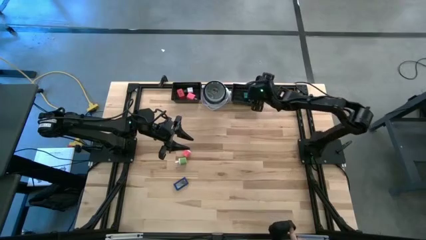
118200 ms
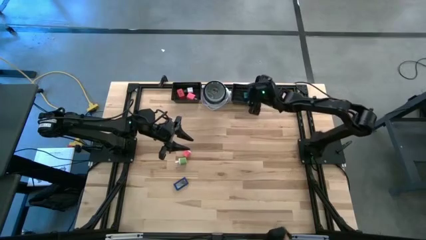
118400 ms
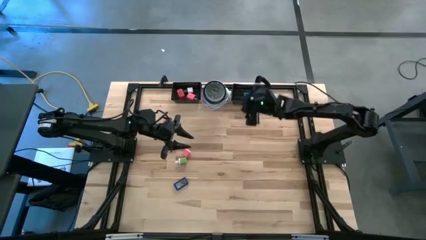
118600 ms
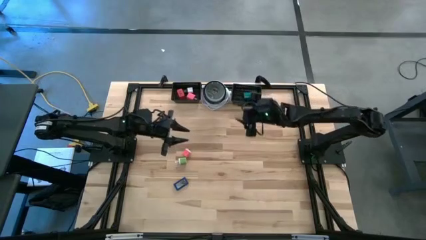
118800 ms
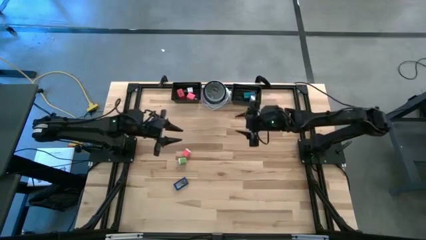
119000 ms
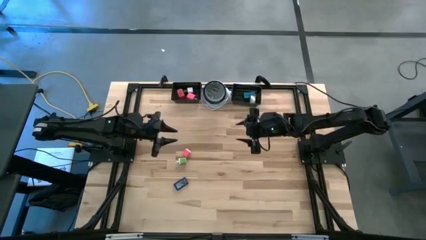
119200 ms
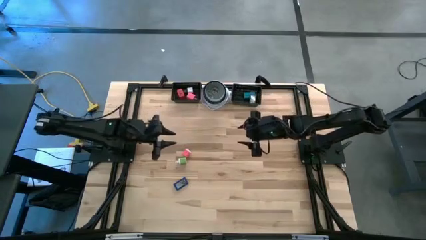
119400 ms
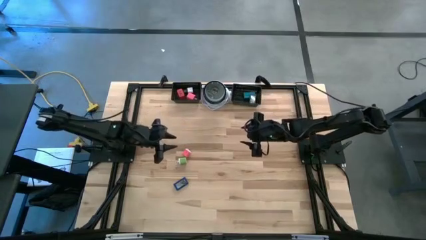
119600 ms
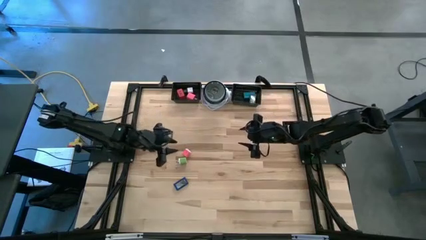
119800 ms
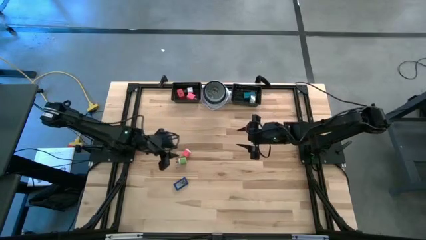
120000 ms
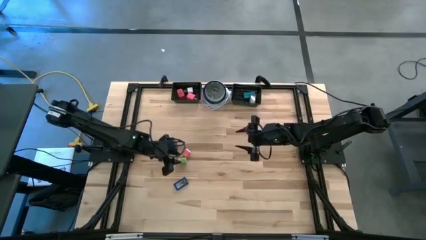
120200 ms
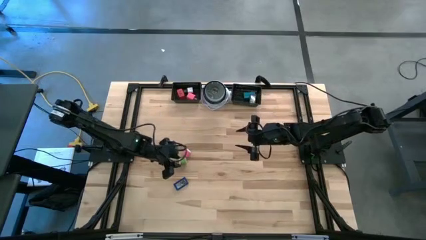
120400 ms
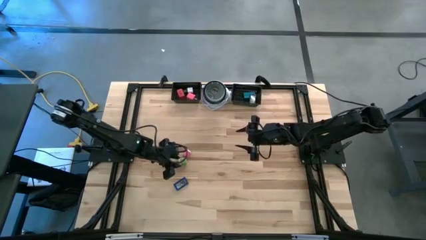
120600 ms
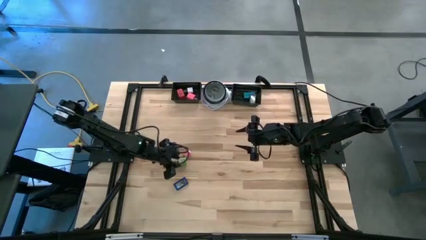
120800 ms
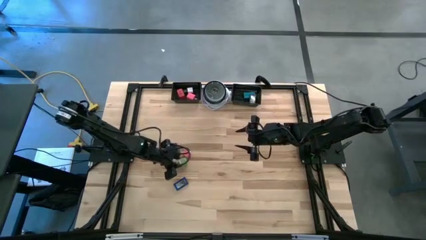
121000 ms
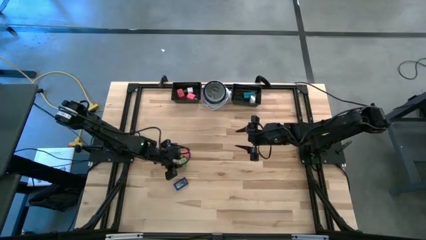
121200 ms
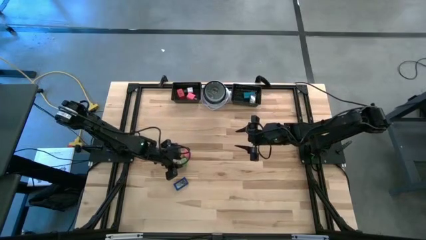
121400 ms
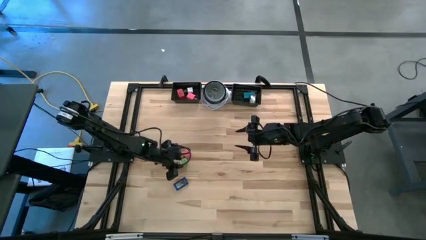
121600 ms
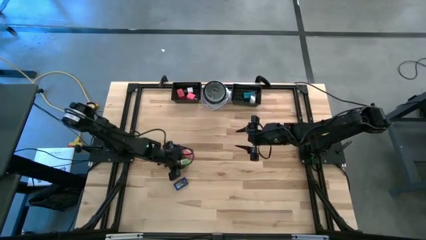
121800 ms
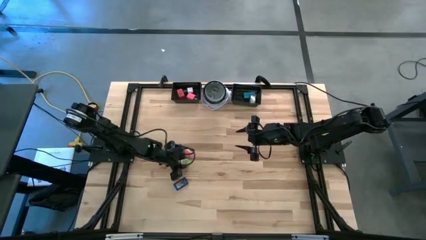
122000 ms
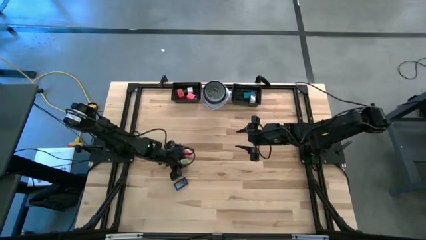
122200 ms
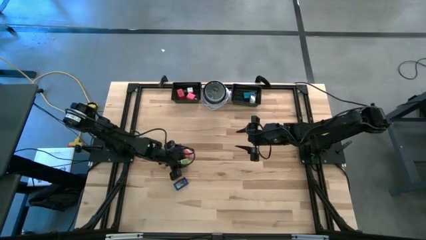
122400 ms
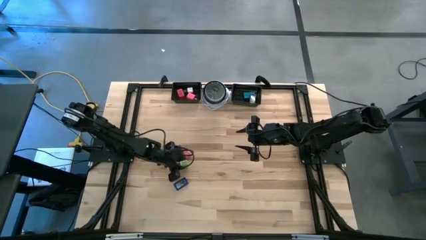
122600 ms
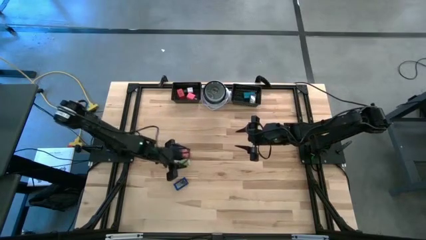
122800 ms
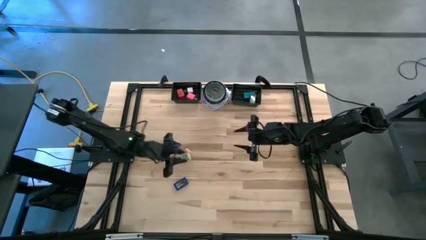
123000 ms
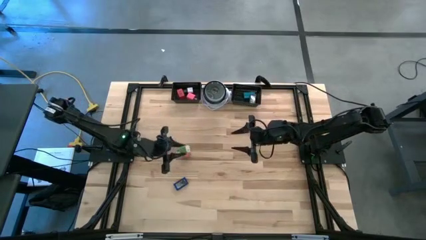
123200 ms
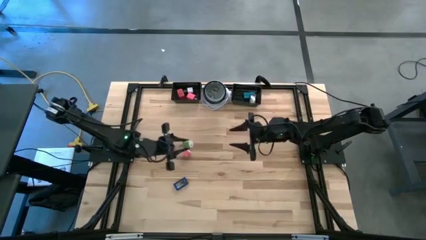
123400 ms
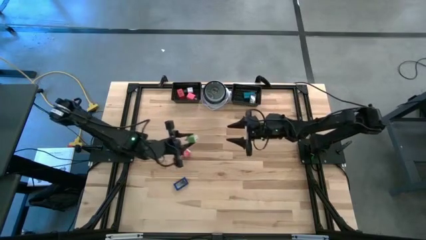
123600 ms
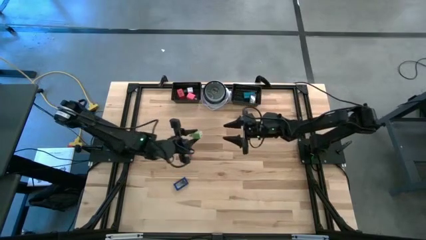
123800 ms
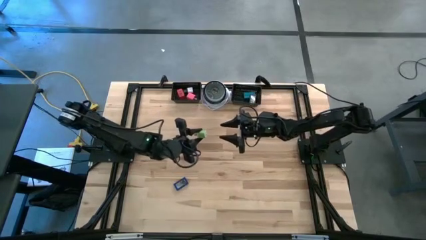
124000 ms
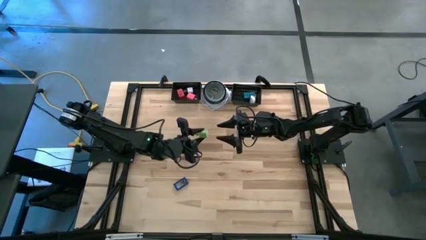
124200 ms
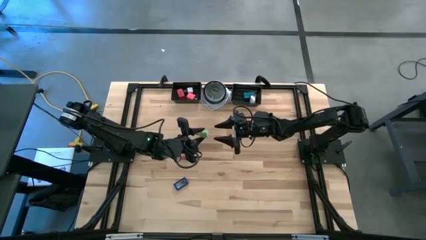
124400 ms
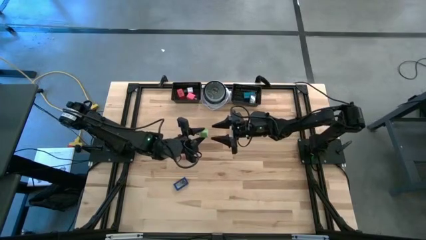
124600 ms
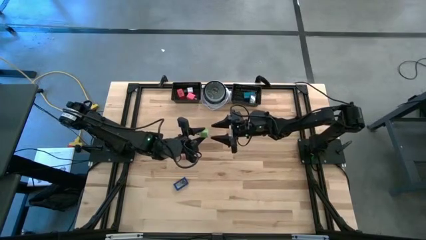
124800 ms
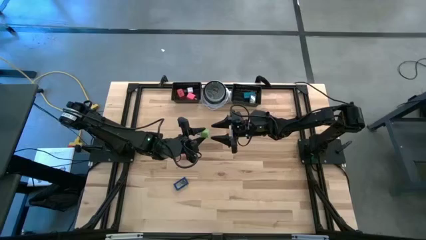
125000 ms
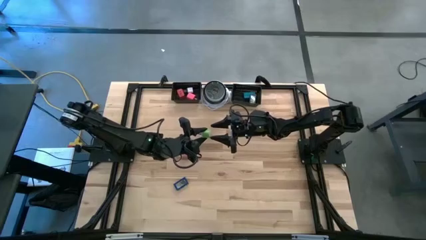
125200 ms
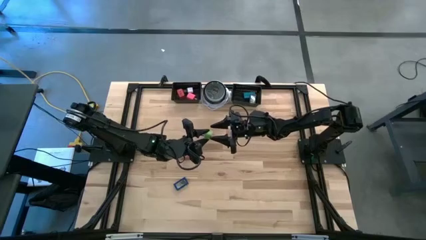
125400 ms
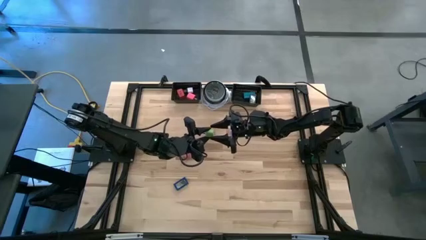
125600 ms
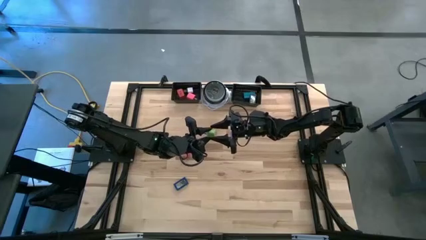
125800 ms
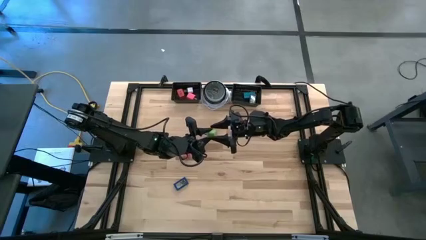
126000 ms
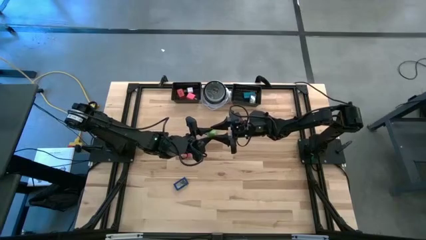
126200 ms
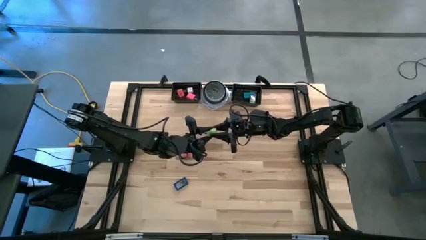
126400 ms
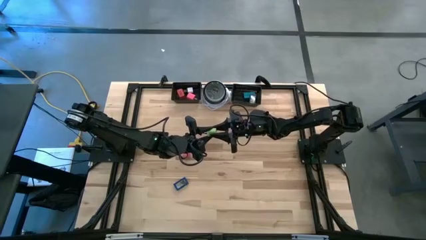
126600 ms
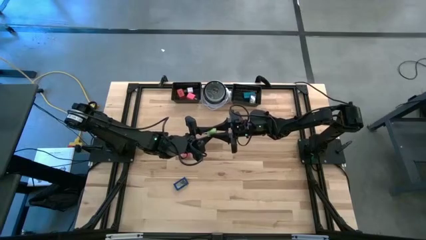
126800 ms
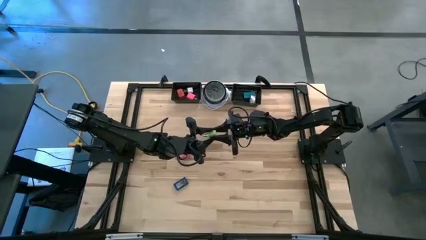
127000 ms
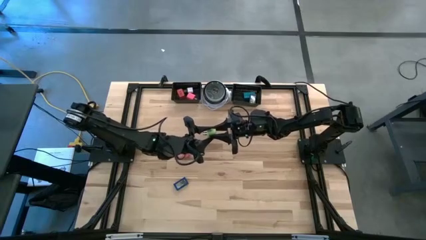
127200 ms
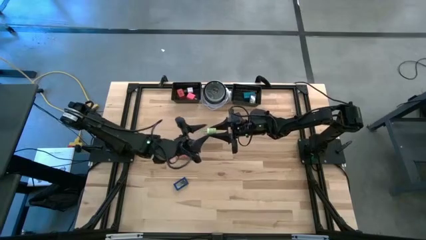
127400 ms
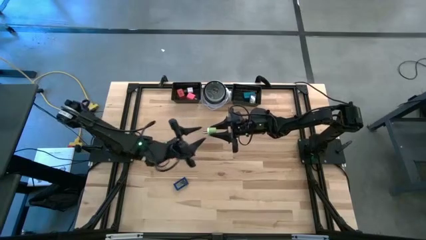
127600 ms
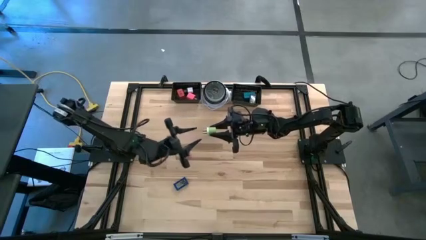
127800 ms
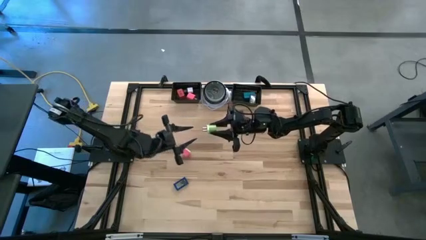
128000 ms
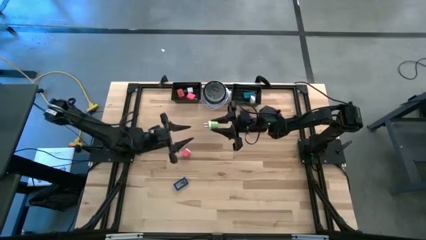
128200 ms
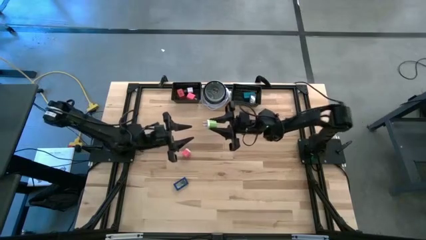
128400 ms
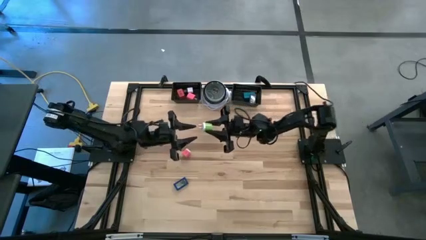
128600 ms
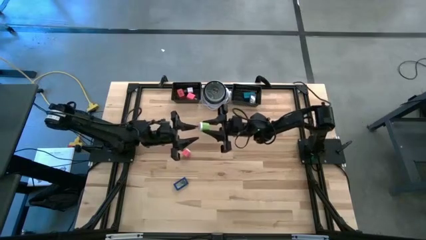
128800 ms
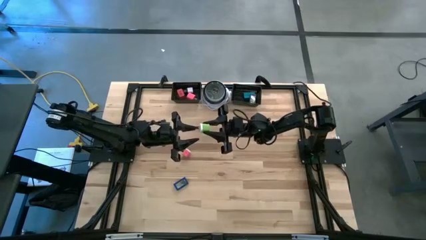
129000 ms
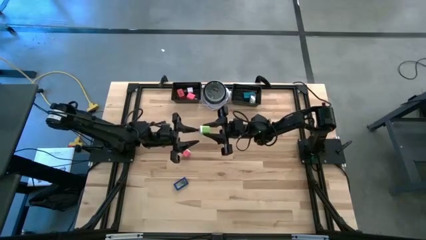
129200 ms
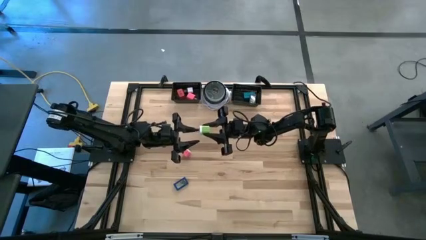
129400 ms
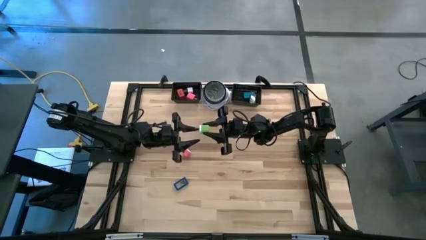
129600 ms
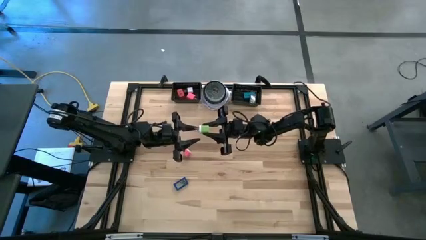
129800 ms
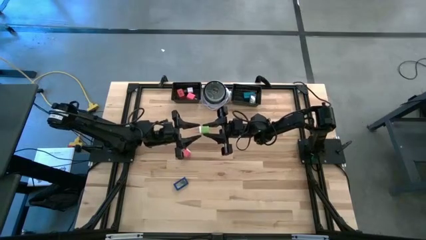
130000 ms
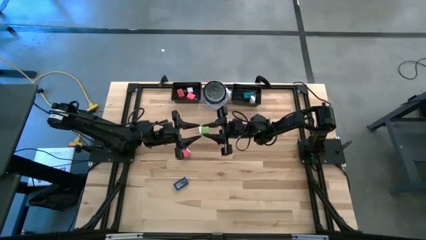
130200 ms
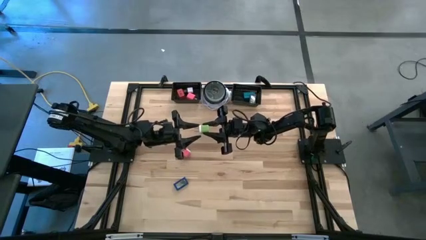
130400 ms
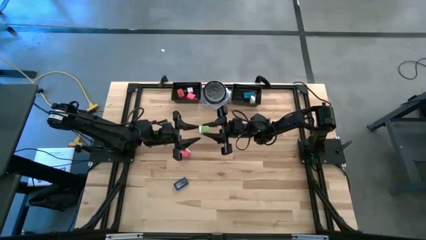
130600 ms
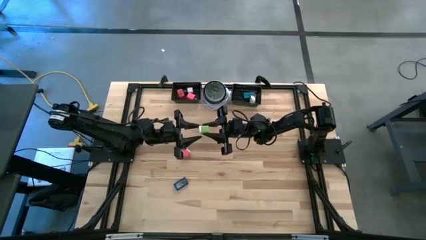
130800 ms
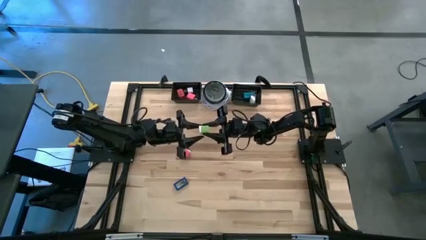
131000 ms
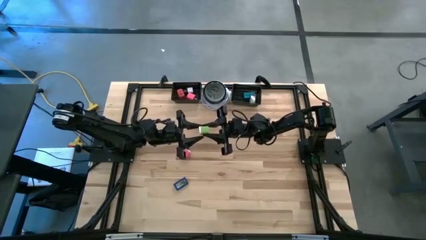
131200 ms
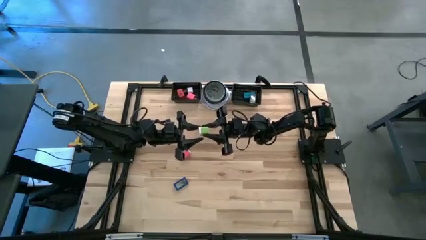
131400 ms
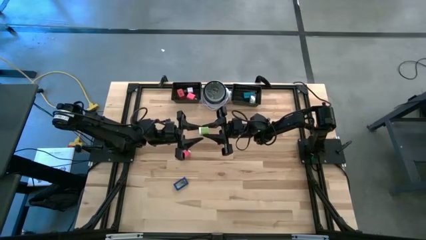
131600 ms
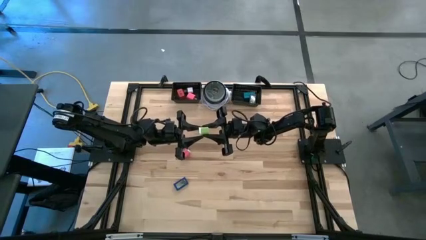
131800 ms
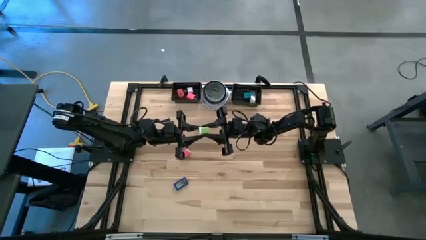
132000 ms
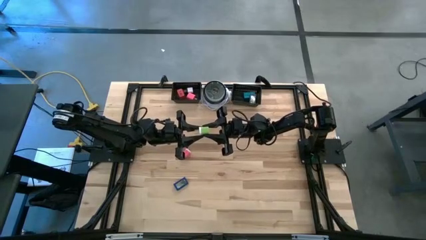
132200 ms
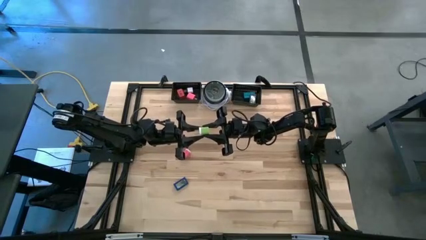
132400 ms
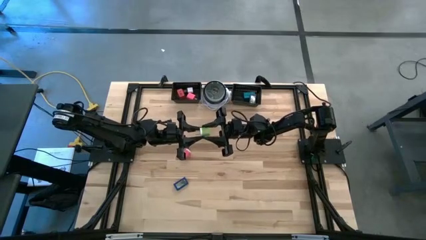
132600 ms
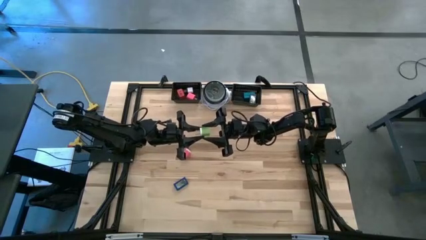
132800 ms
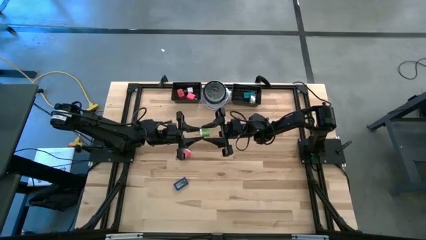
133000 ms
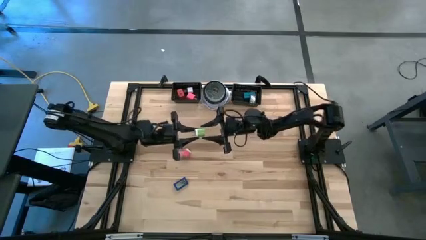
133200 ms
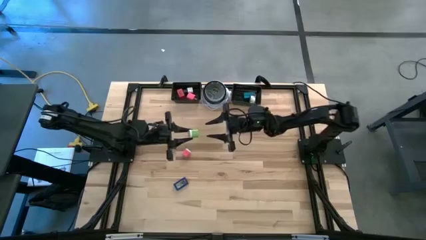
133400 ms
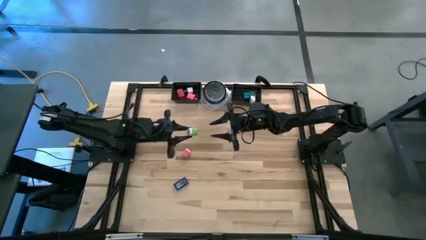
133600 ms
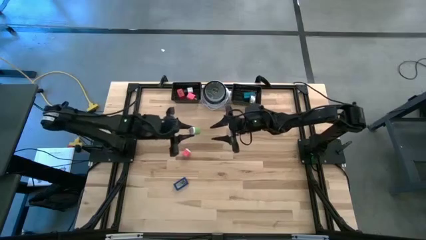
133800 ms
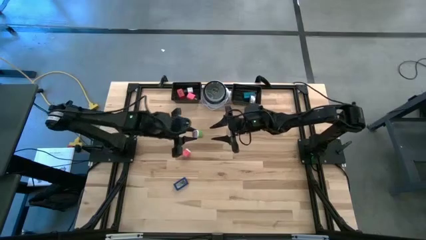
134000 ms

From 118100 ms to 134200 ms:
Task: Pick & Place Office items
Put the green charger adapter into the left black basket
